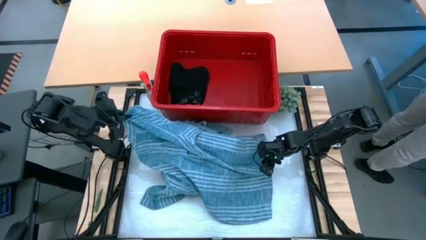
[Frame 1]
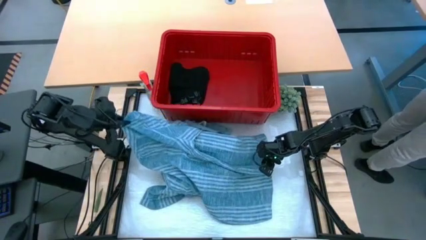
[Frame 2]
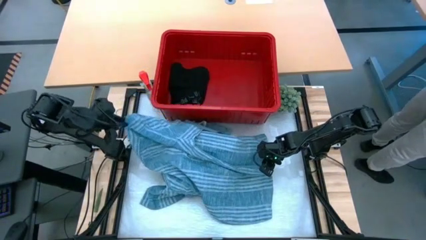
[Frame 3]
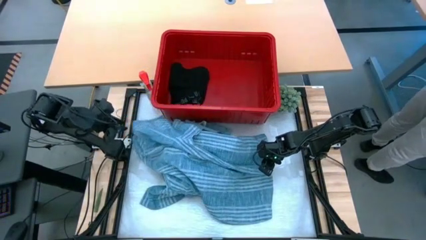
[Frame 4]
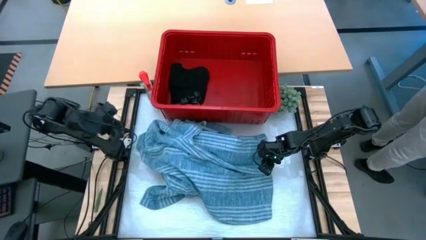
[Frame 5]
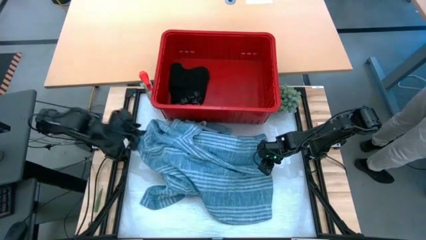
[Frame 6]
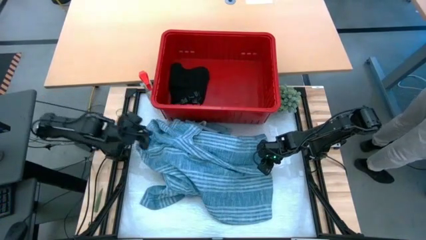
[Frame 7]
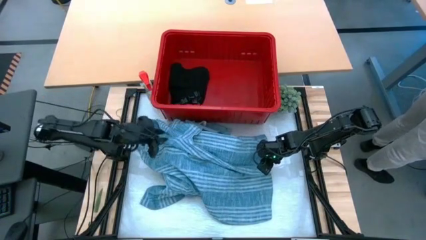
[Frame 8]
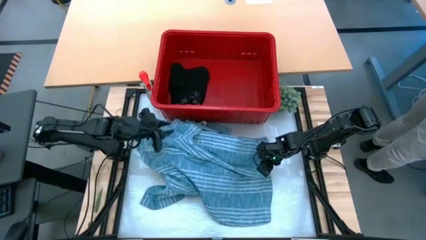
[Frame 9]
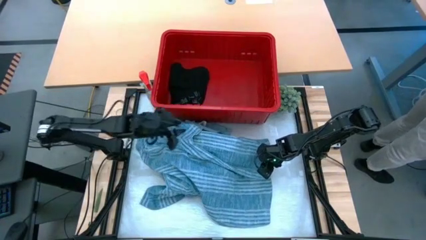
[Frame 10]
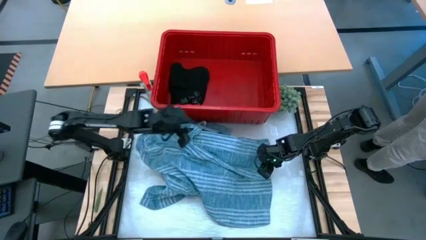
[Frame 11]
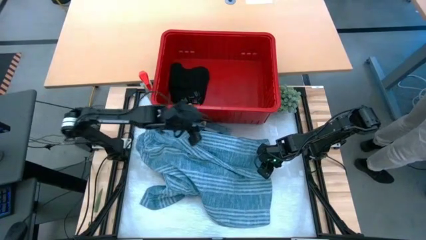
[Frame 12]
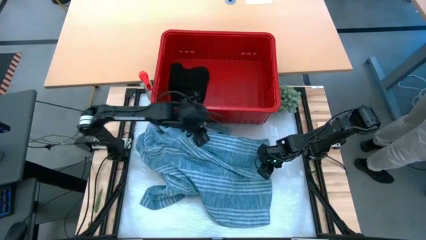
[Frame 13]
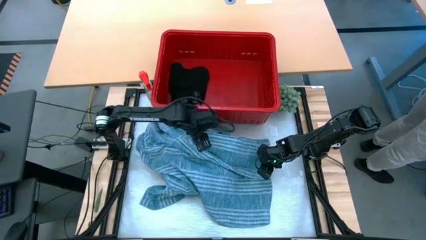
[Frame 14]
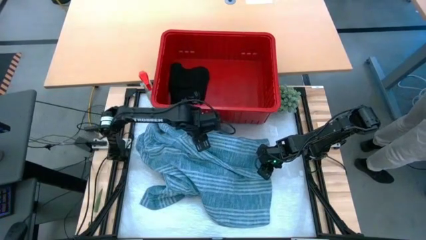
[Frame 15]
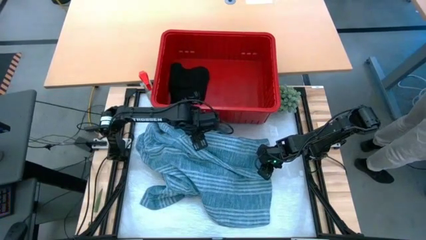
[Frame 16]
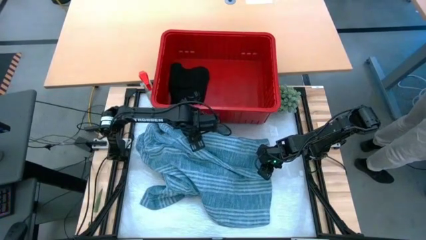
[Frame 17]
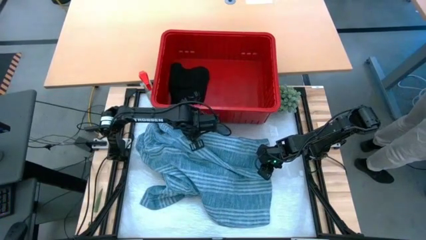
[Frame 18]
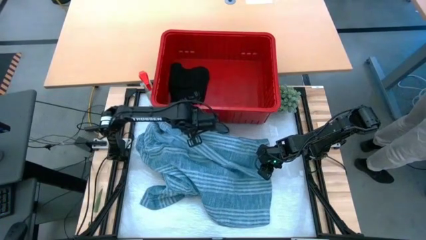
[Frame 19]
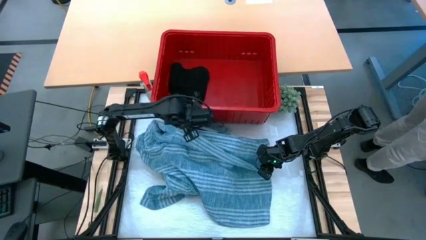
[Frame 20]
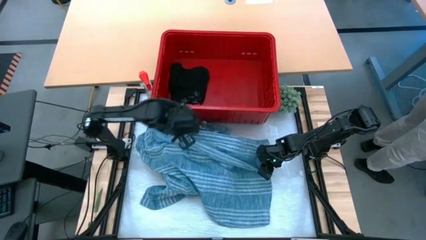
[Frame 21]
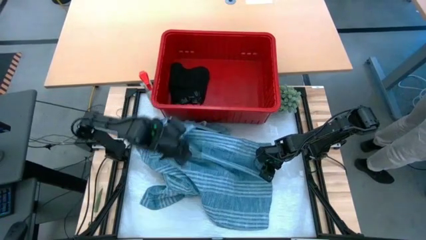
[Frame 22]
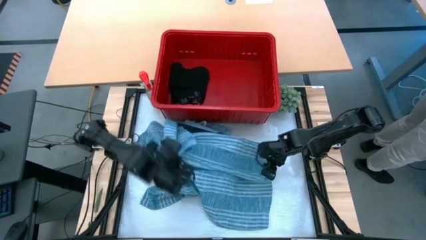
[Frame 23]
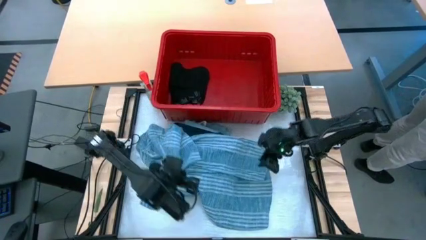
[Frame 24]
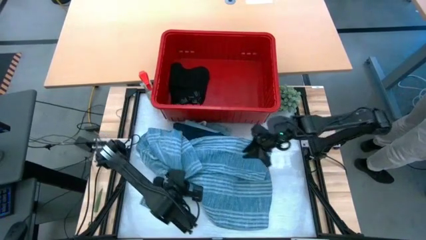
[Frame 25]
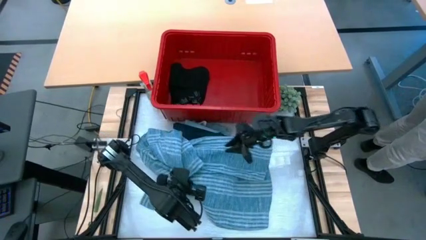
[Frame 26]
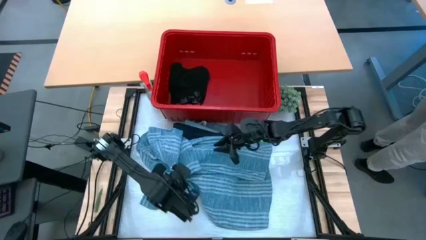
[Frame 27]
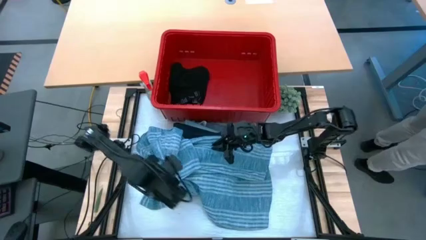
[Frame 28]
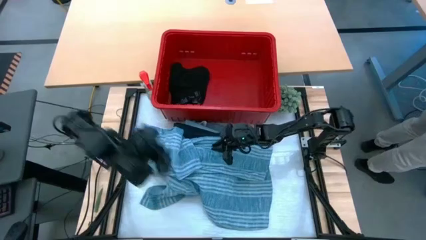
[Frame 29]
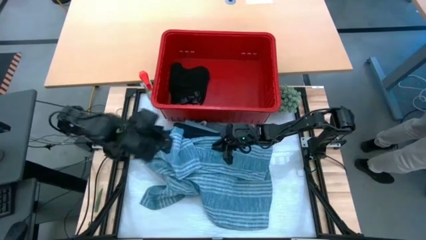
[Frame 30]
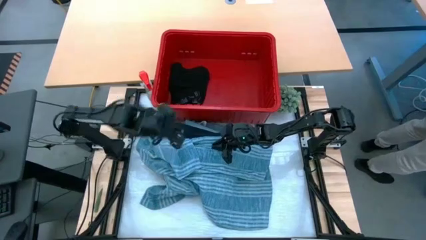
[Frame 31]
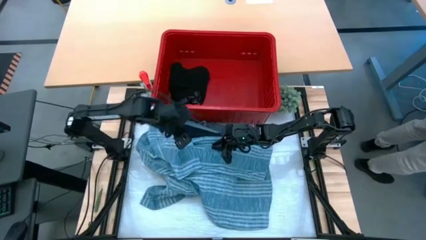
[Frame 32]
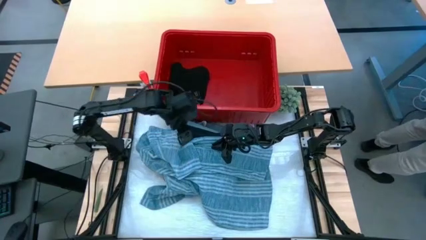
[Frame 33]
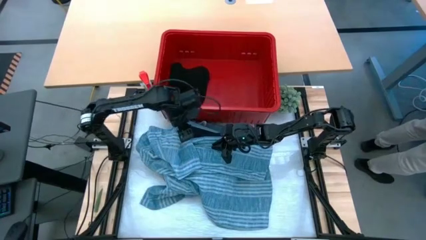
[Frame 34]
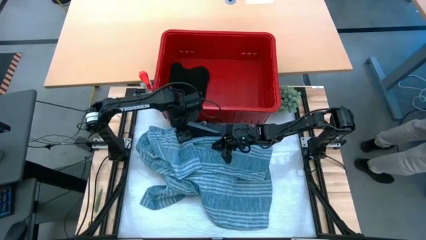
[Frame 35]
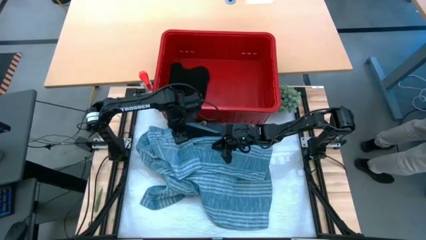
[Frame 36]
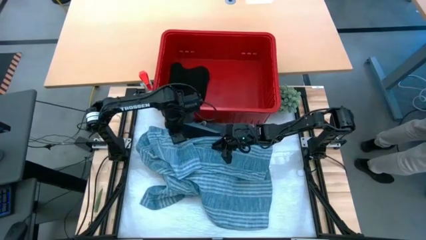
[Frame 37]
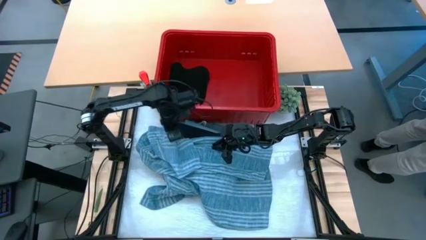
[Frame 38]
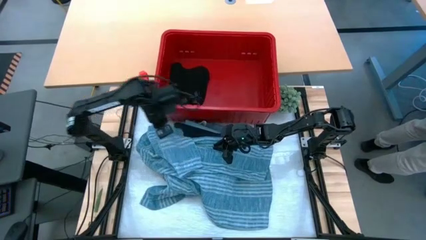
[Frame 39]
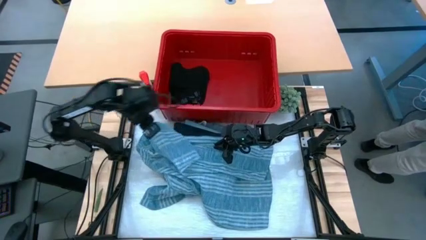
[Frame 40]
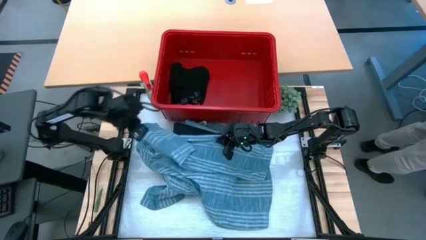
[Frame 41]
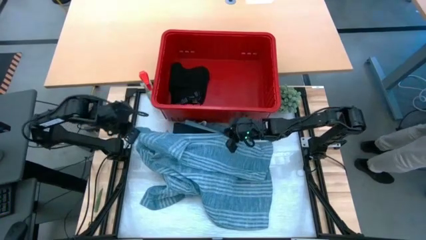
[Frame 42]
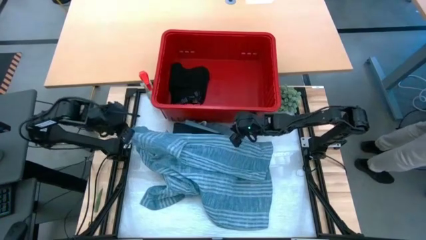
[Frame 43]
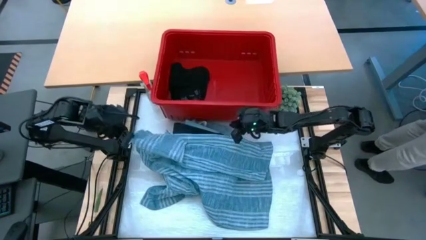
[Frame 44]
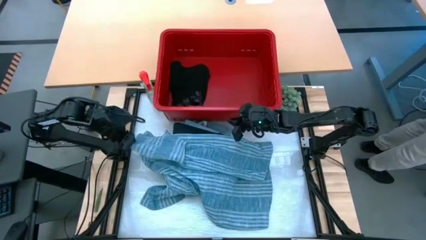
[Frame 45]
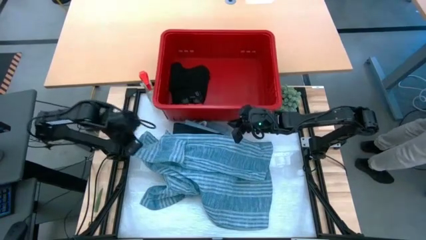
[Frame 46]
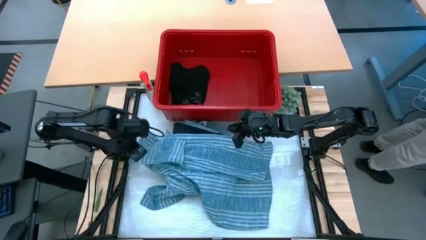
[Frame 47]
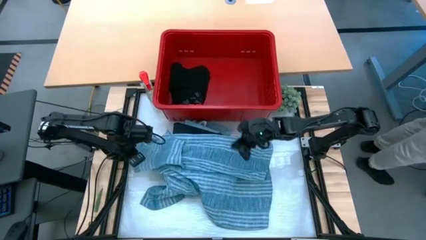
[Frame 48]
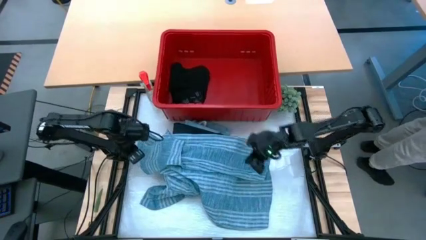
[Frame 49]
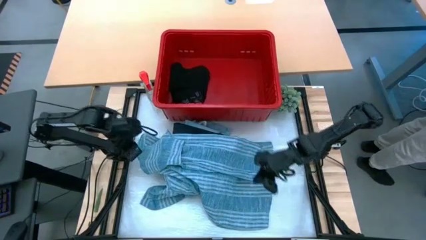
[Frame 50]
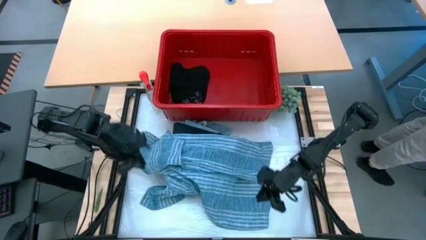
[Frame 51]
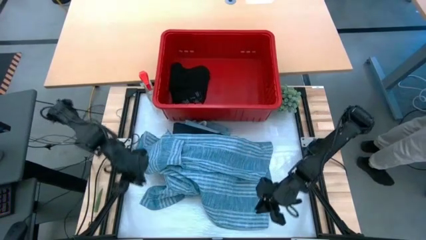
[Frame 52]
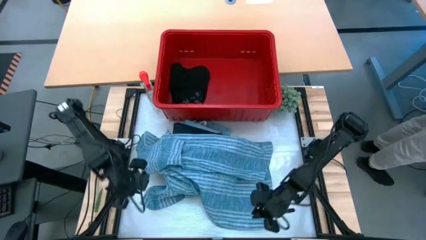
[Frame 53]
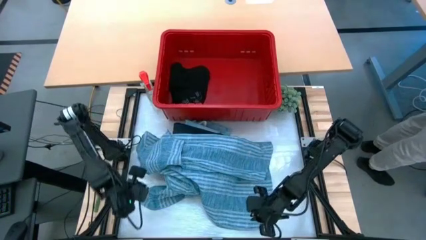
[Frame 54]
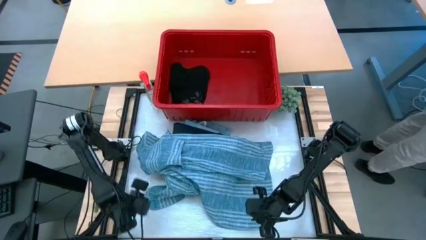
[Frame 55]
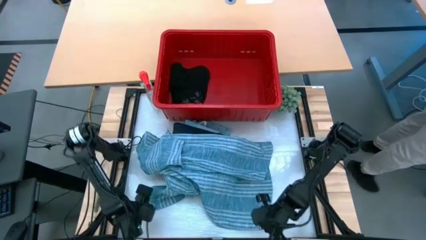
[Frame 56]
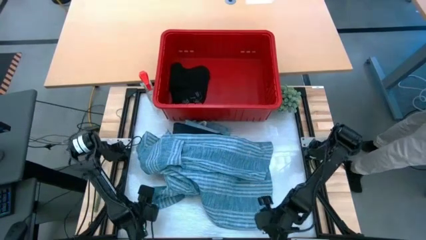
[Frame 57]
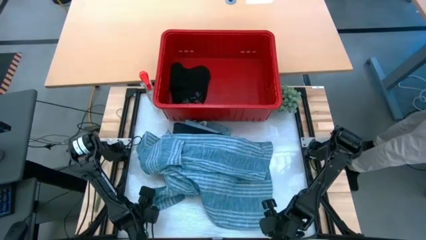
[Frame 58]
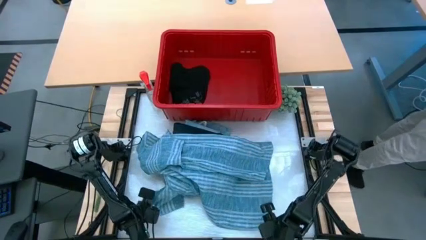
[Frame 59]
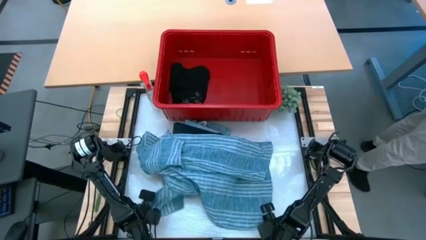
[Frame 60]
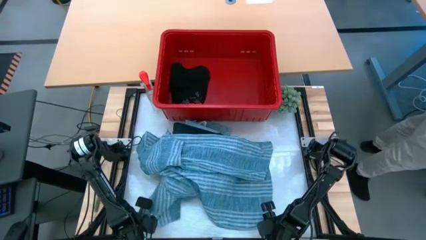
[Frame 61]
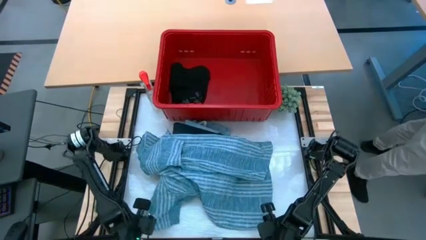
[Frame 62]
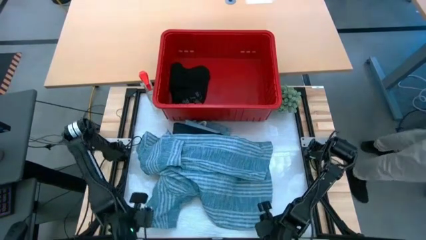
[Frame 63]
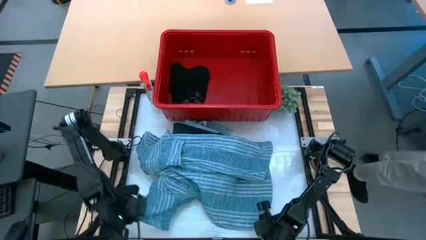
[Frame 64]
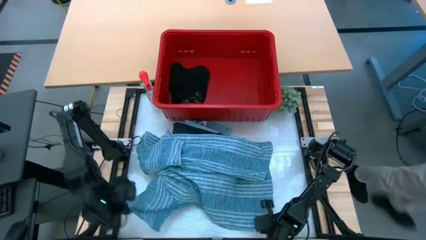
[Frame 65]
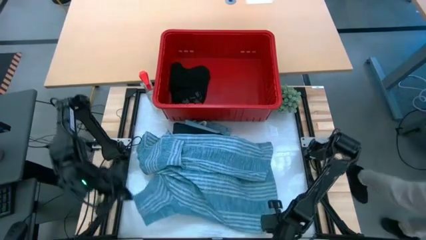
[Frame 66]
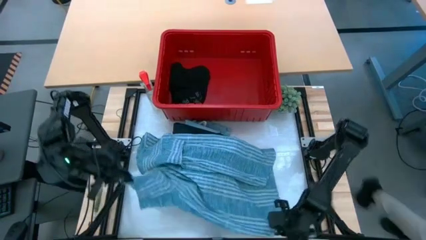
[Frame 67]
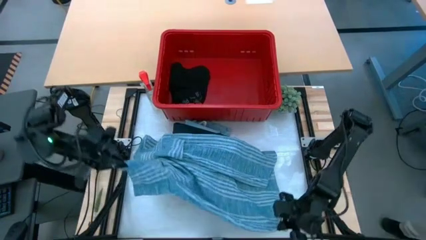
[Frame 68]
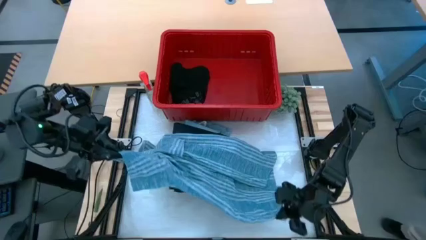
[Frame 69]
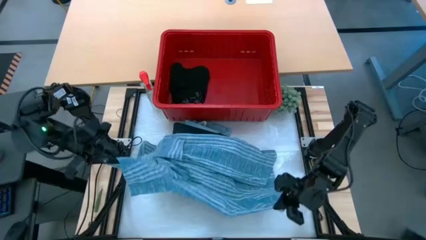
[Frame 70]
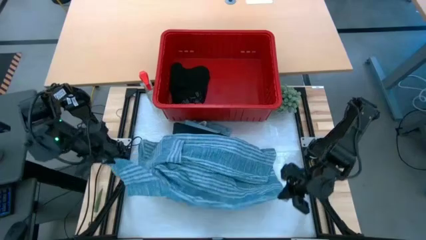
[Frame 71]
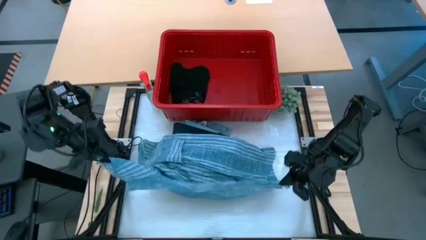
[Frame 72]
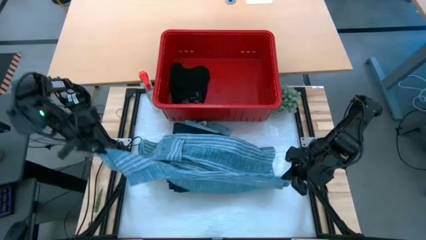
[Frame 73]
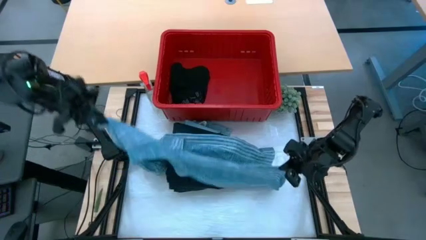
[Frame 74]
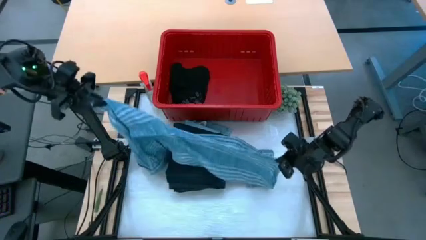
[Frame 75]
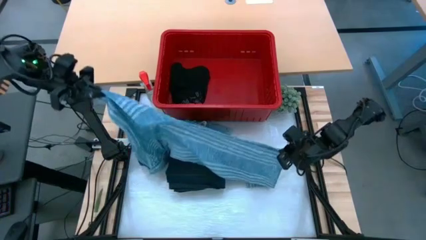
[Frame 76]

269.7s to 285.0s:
Task: Fold Laundry from Bin
Fold the blue and white patterned shirt

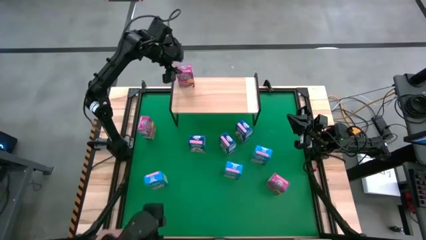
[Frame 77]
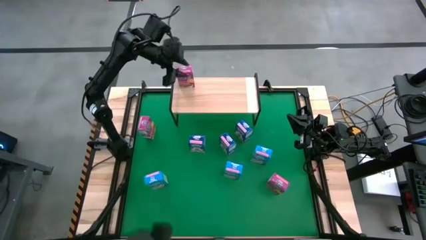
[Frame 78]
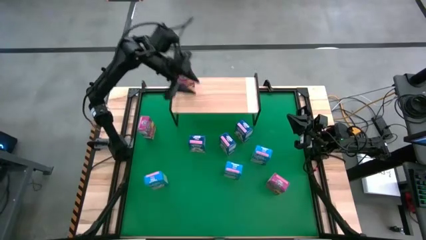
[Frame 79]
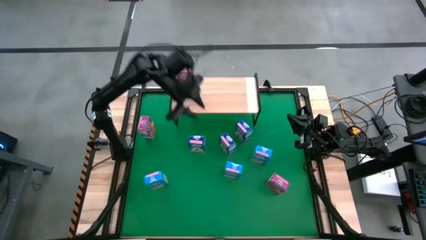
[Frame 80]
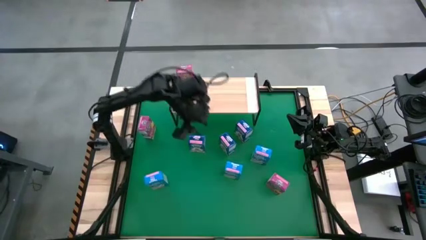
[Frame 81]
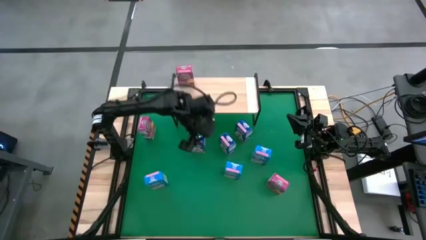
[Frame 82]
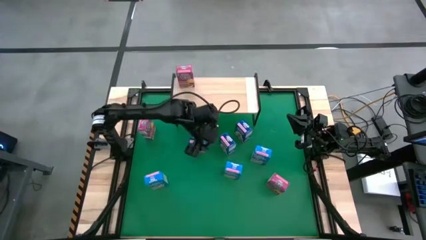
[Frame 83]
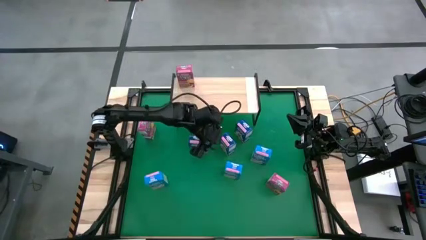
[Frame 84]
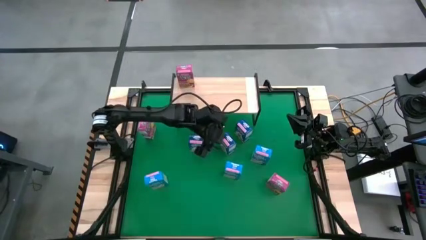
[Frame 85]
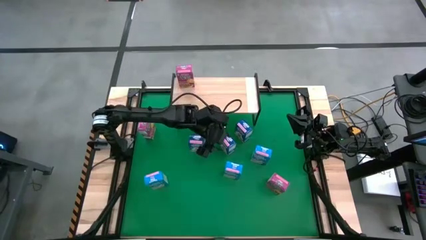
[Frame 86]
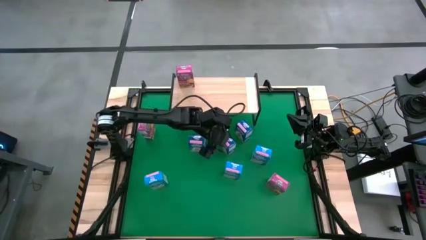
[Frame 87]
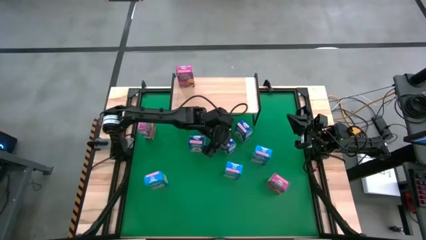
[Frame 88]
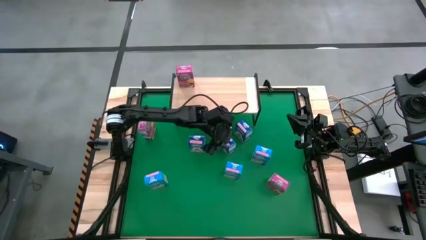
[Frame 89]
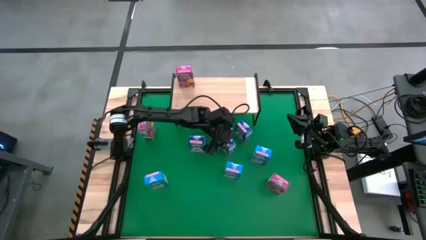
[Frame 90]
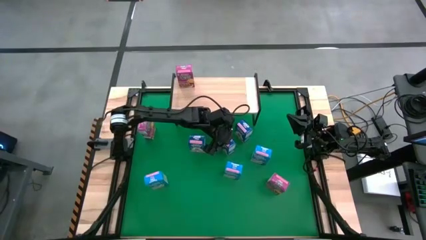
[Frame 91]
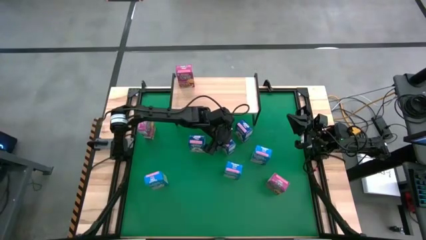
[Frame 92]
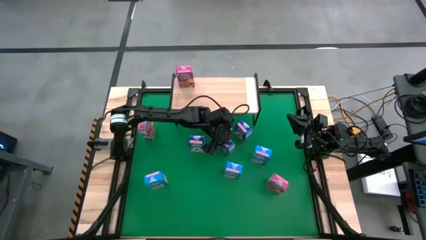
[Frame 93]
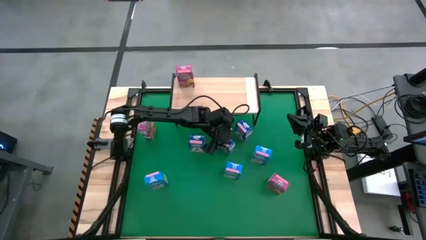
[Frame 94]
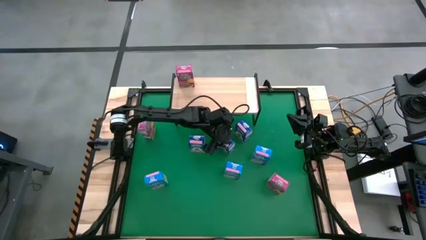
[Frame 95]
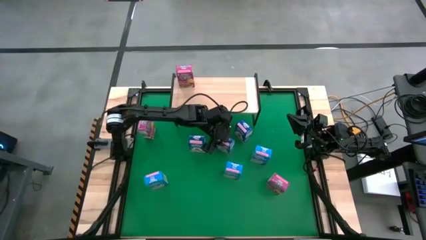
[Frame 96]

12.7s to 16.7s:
Task: Stack cereal on shelf
Put the middle blue cereal box on the shelf
